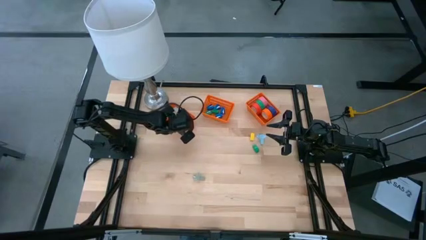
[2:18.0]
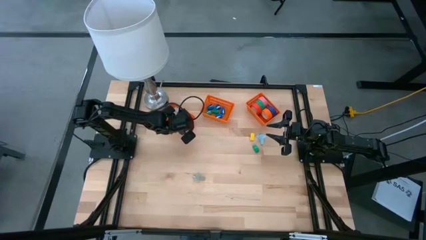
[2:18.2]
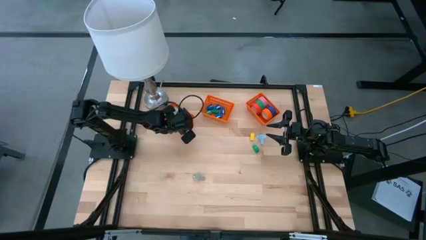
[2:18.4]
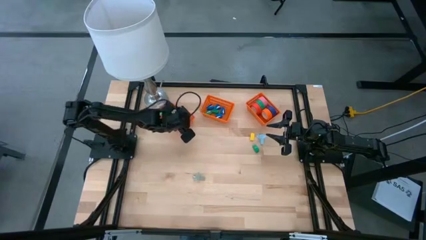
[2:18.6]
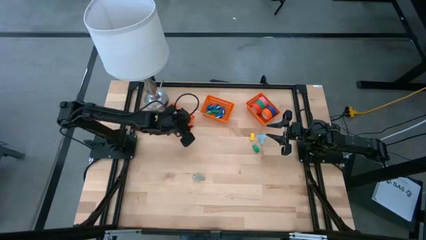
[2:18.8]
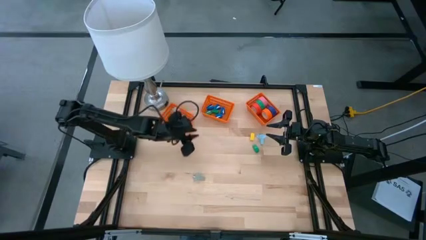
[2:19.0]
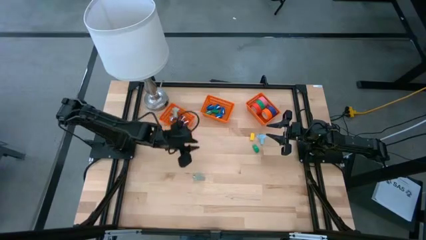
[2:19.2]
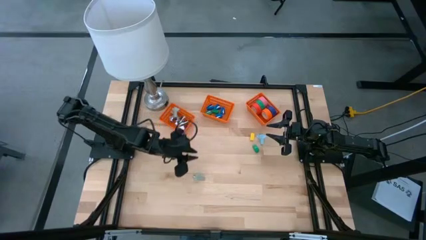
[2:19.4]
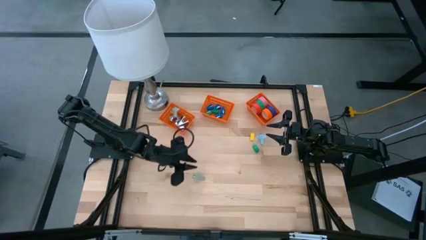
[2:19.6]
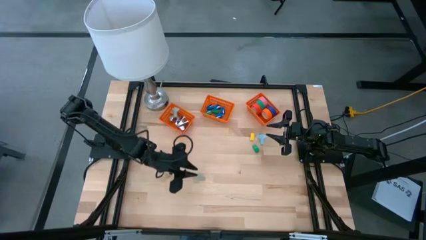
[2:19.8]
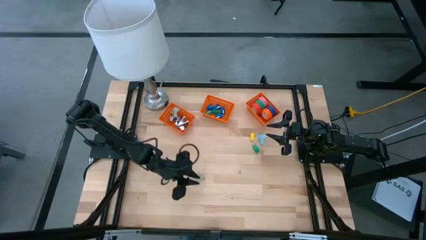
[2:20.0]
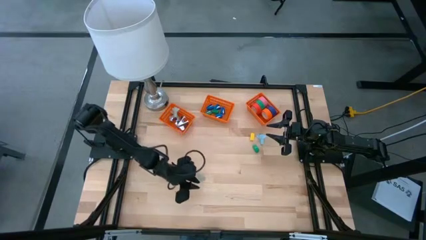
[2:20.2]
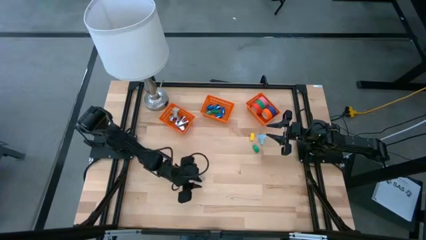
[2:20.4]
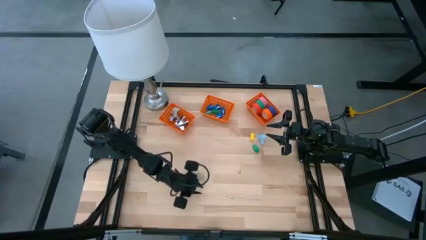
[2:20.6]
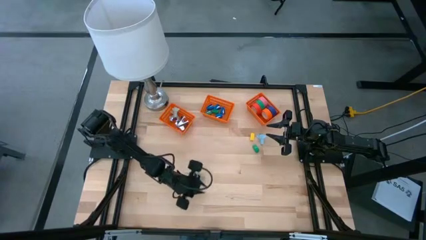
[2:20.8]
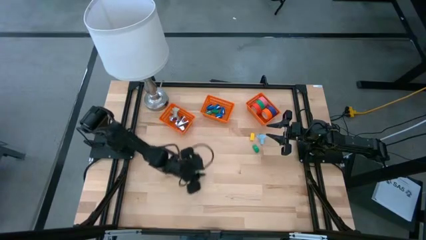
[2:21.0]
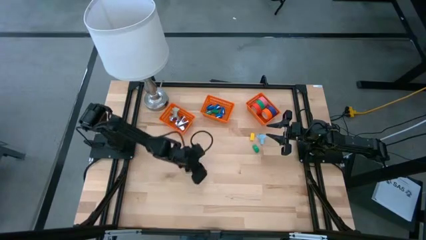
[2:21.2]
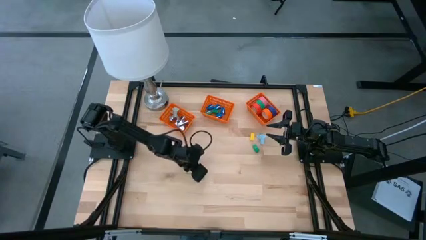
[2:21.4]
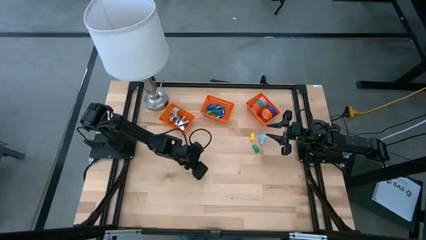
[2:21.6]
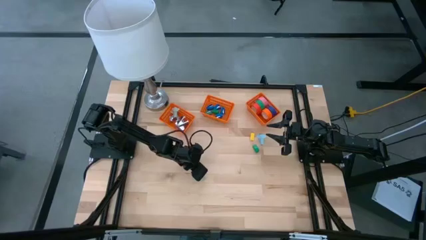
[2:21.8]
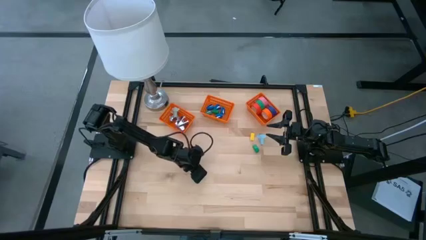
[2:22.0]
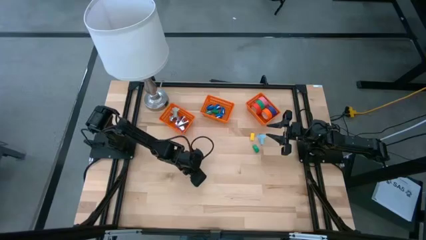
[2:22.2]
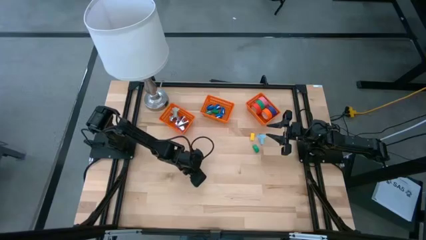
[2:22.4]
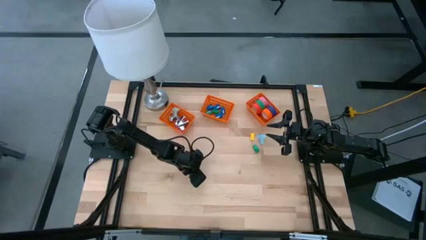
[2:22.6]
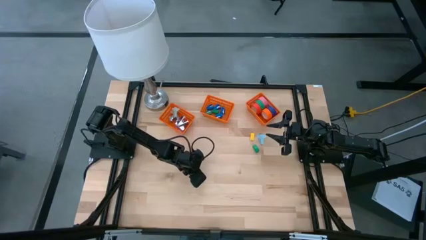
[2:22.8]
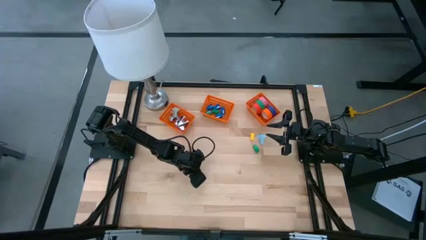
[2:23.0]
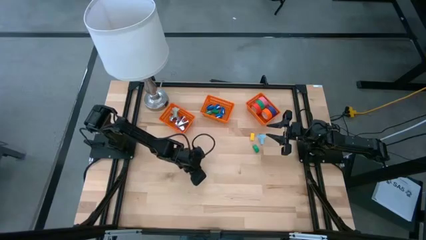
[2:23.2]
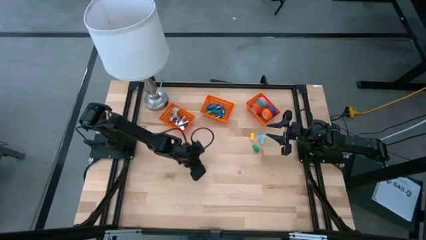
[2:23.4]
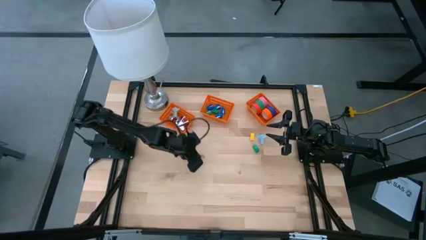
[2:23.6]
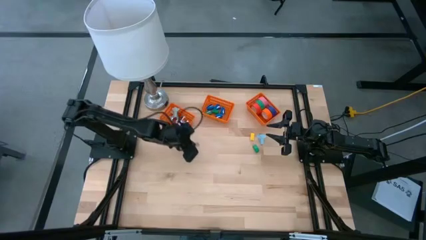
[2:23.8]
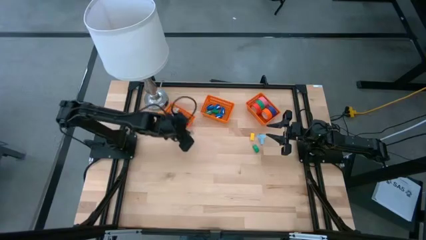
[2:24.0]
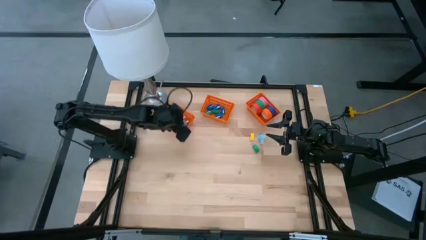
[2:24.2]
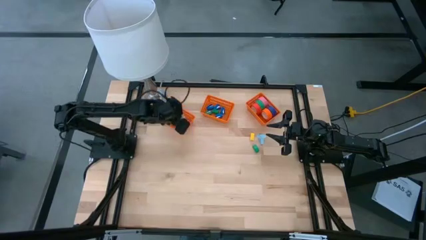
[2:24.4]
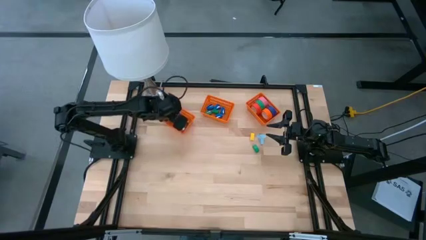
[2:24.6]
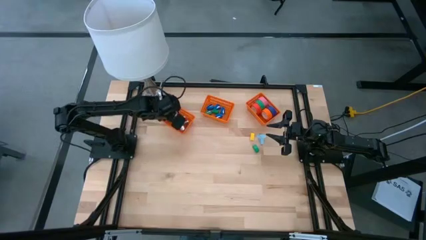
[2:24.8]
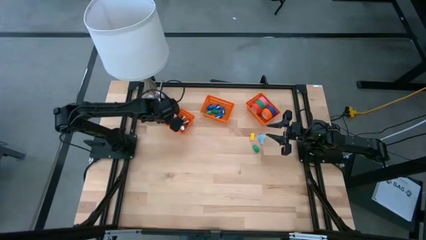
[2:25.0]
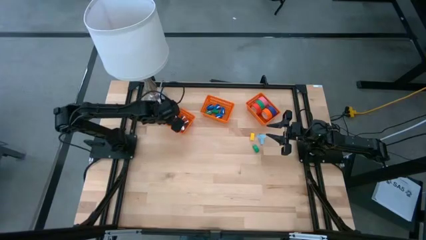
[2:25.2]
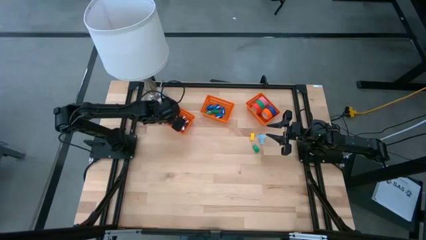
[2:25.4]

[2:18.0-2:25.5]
Task: Pick and place Stapler, Stapler remover, tape
Put the gray staple remover into the left orange bin

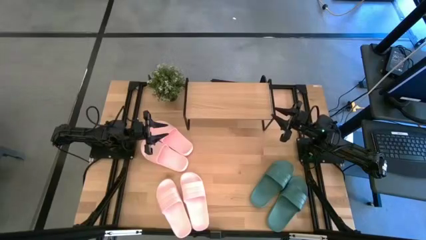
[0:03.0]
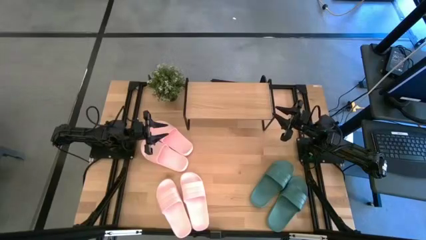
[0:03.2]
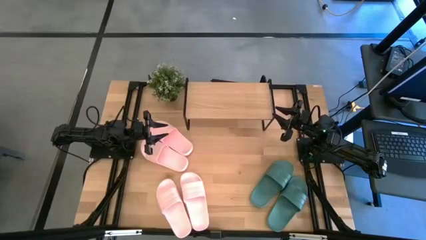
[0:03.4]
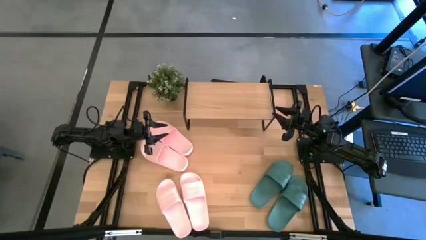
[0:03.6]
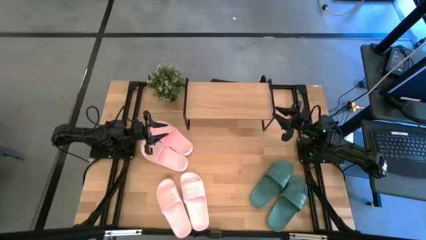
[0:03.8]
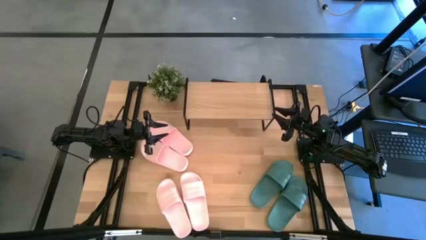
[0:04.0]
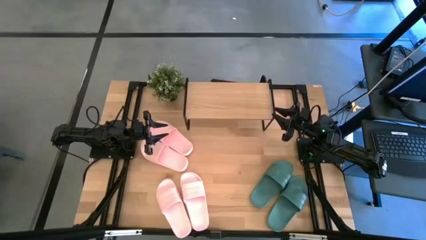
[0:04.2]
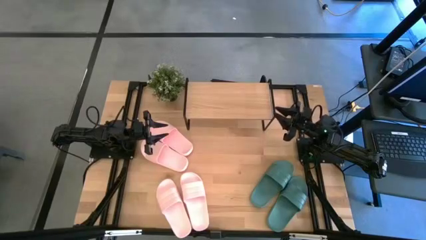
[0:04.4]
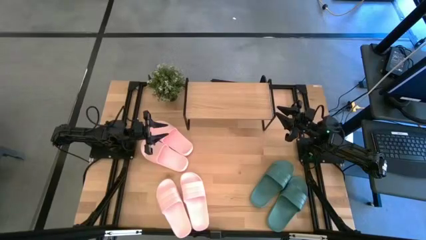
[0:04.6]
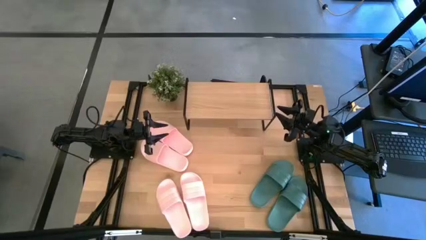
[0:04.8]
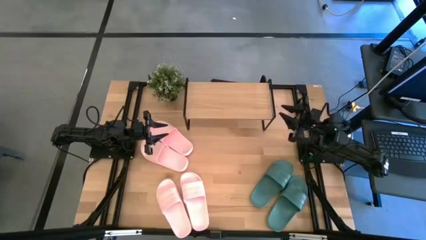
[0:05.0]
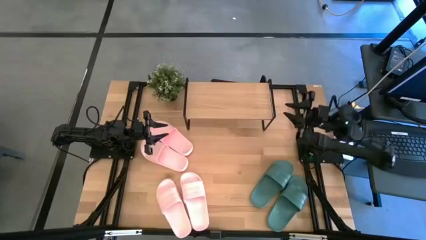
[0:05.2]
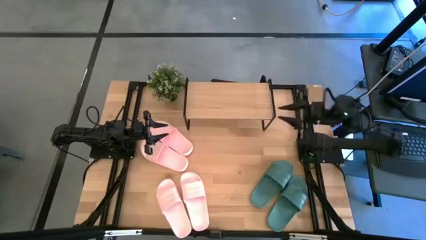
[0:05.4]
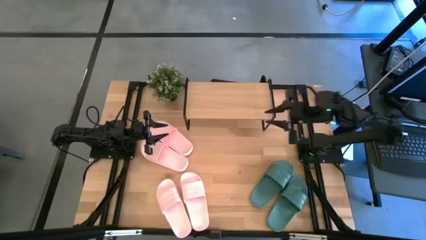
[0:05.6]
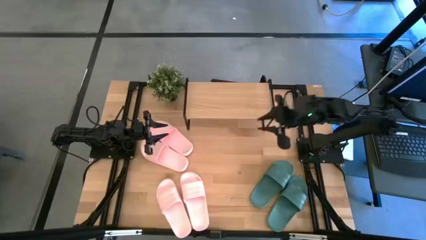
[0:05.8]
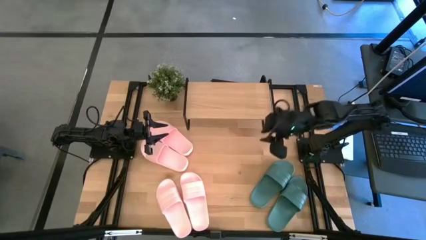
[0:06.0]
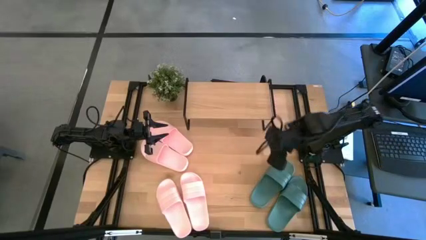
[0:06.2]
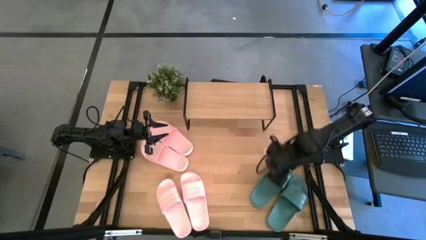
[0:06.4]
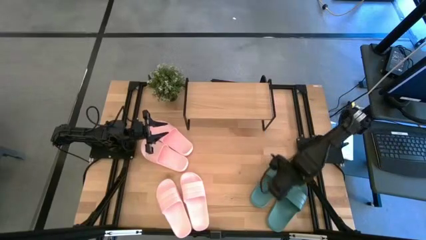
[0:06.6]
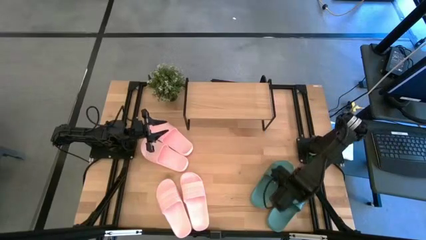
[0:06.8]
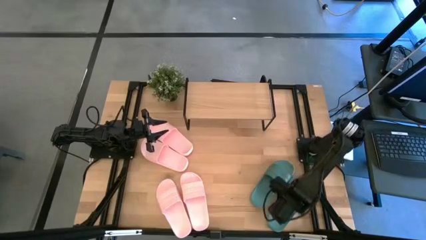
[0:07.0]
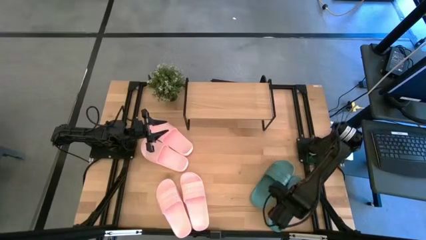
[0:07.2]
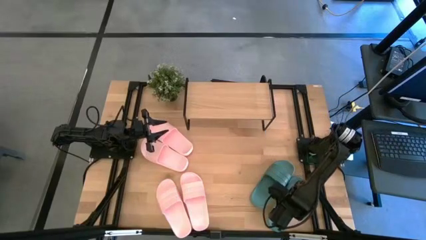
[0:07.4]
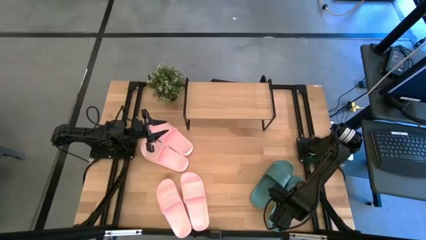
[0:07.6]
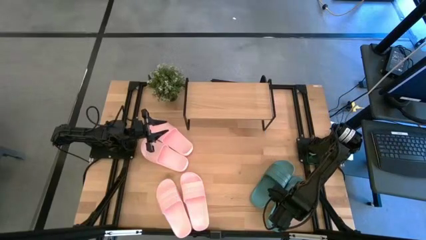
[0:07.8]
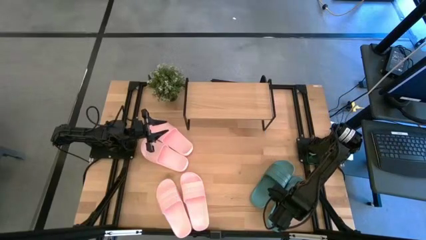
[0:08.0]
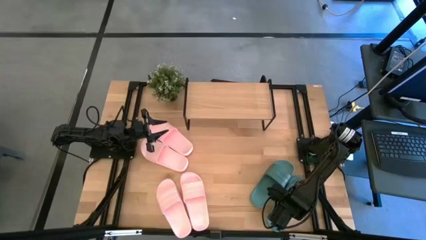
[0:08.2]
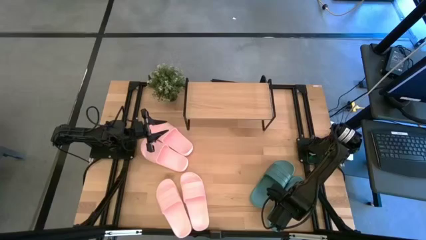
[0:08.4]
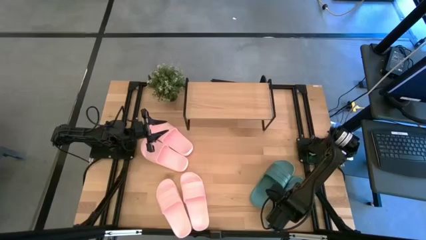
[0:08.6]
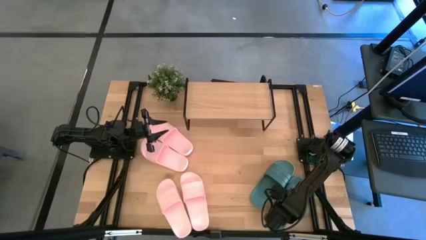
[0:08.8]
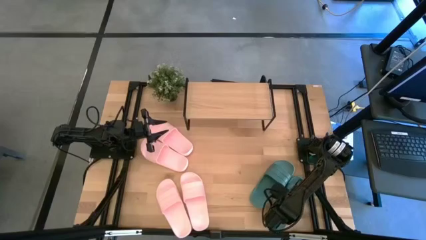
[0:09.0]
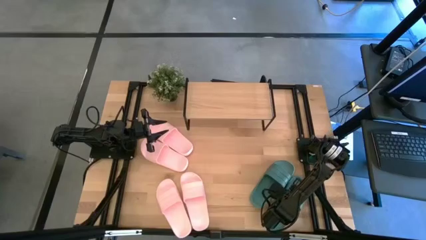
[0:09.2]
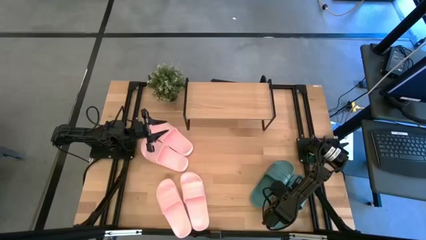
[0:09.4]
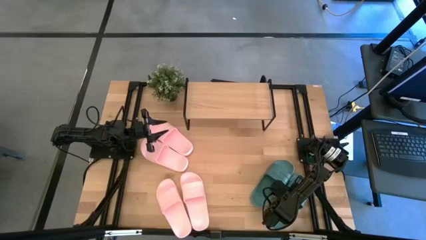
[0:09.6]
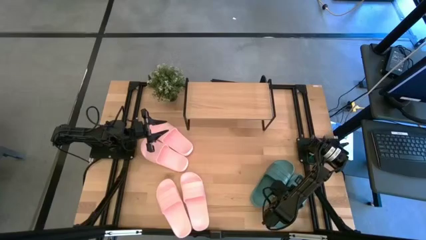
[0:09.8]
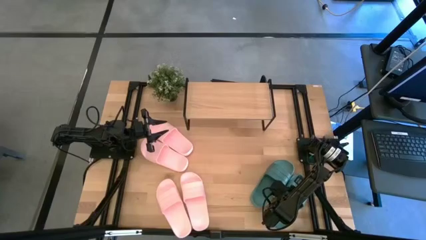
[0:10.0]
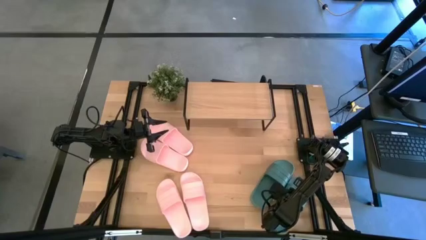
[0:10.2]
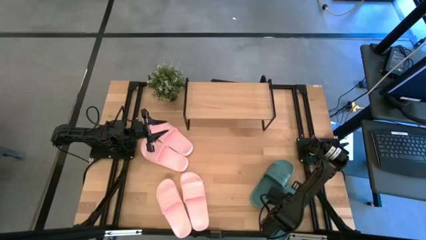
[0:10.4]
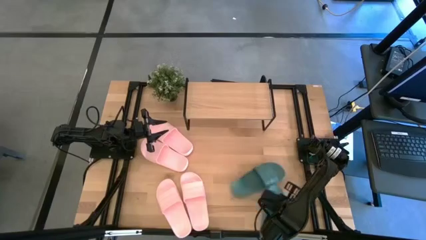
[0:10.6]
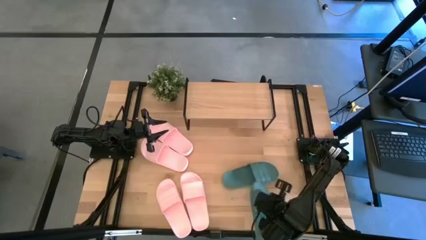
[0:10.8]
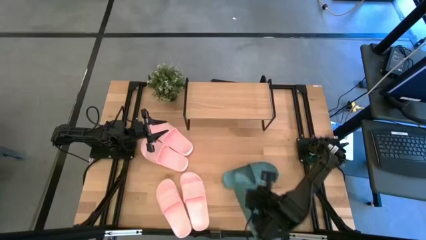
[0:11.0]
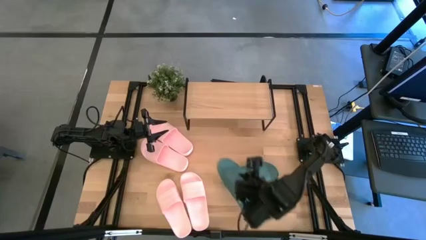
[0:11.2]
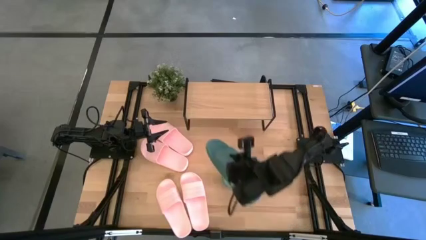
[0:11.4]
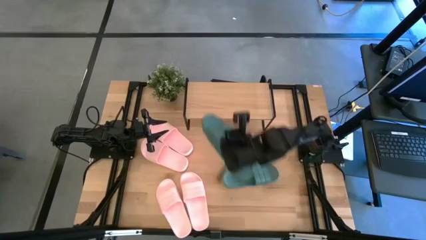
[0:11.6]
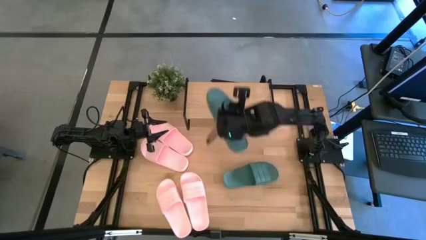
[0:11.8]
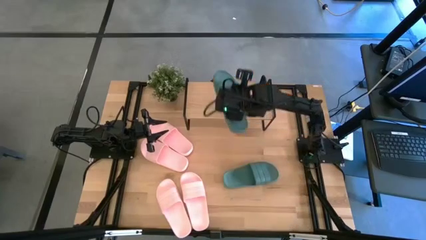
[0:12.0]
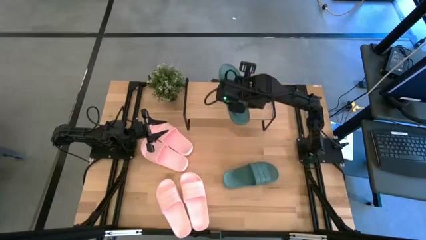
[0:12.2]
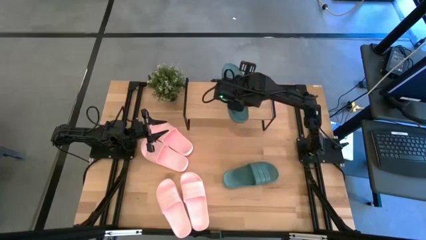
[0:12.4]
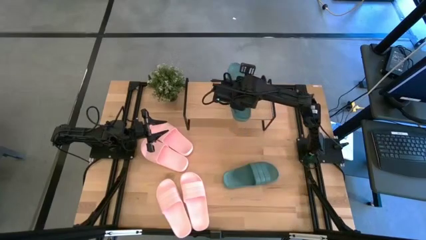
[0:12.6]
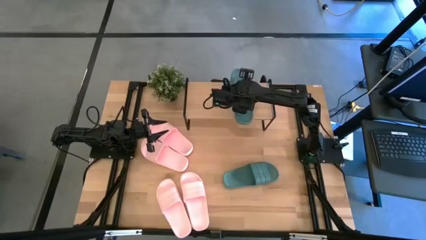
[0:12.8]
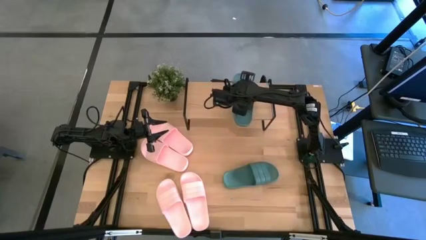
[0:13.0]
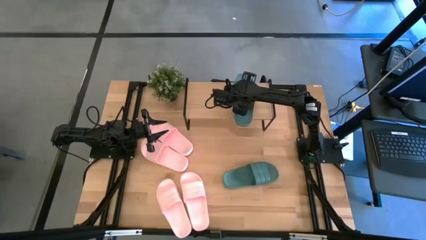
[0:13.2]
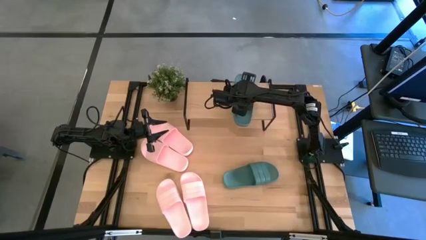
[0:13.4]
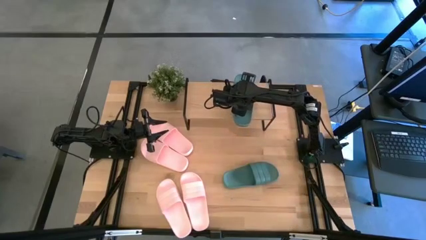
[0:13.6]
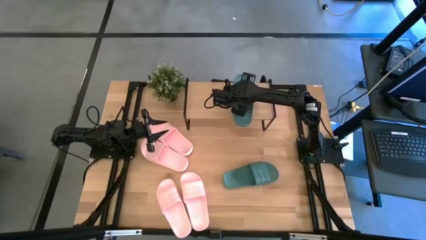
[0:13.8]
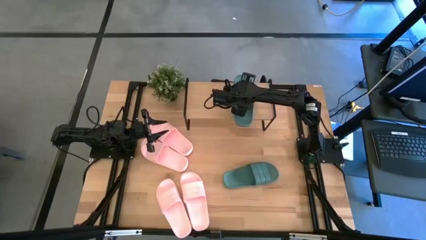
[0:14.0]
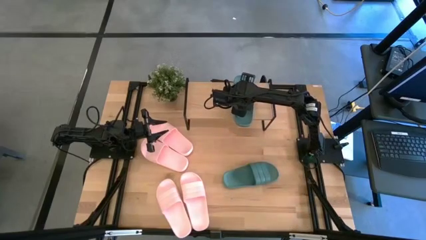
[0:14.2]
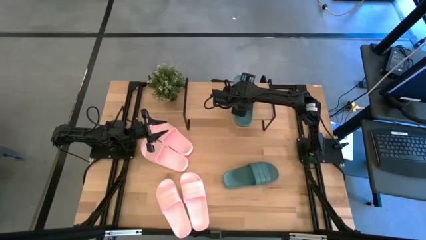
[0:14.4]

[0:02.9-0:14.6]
Task: Pick and place slides into the shelf
Put the green slipper on the shelf
